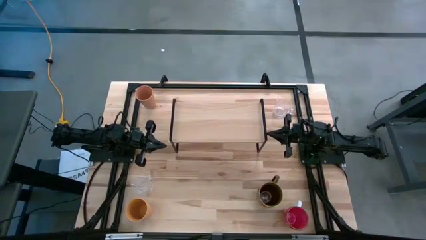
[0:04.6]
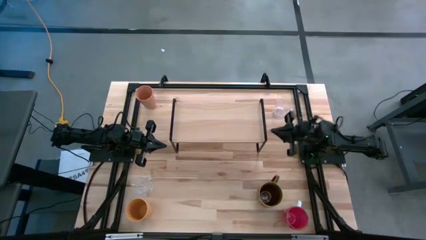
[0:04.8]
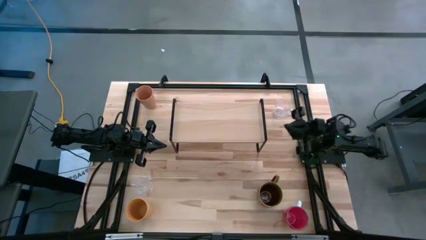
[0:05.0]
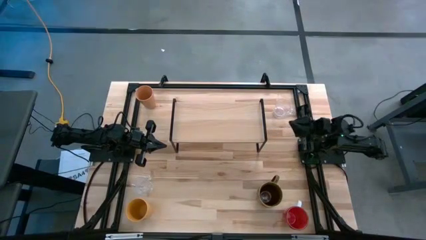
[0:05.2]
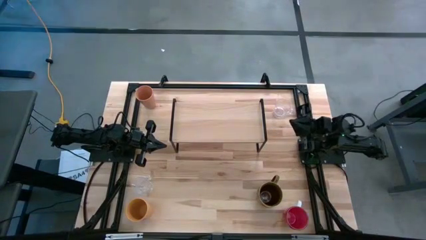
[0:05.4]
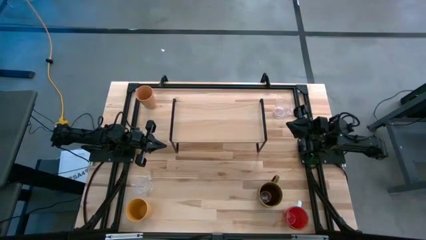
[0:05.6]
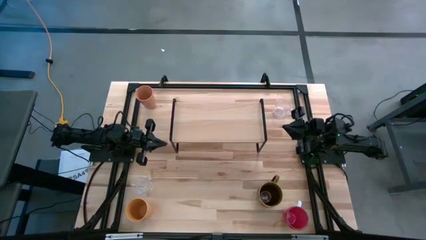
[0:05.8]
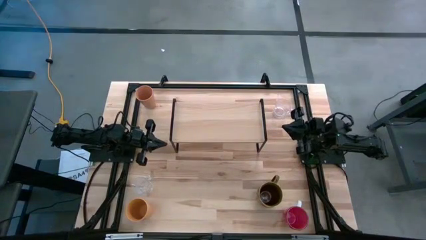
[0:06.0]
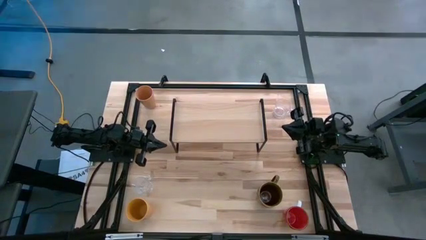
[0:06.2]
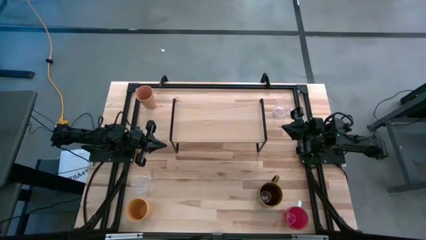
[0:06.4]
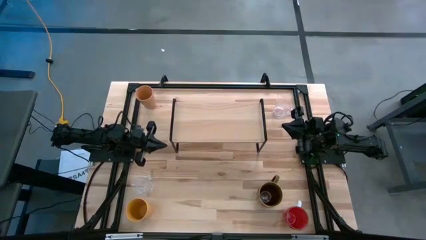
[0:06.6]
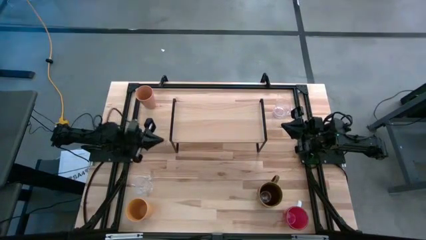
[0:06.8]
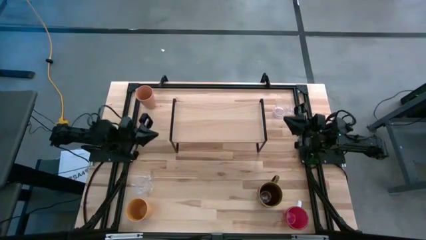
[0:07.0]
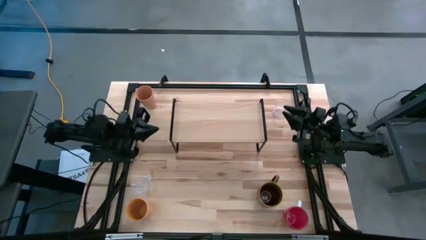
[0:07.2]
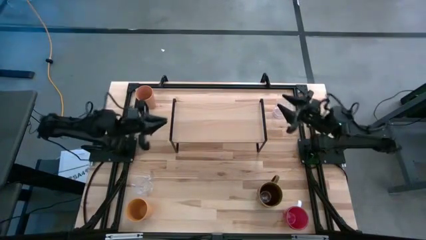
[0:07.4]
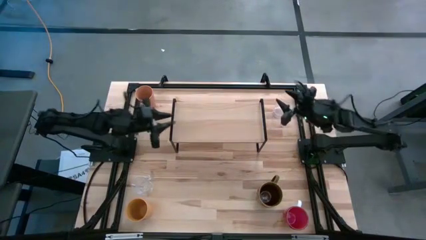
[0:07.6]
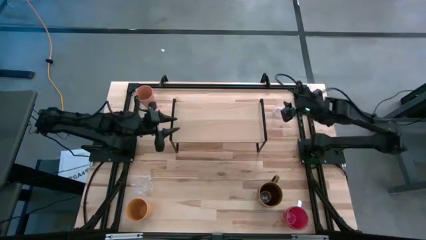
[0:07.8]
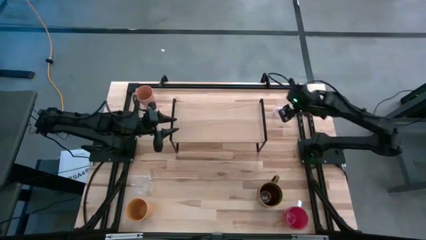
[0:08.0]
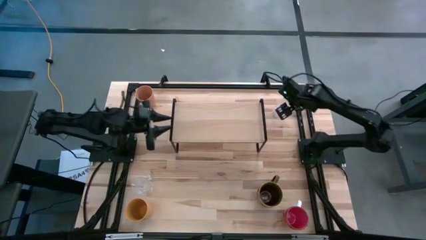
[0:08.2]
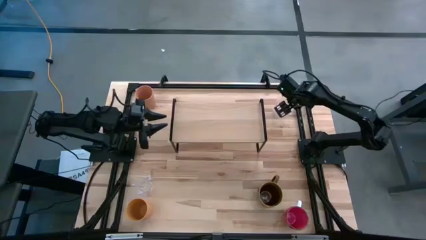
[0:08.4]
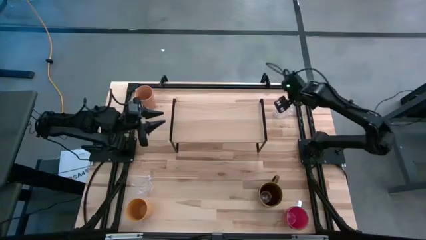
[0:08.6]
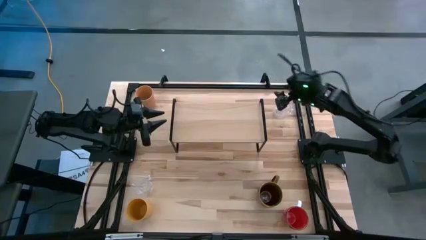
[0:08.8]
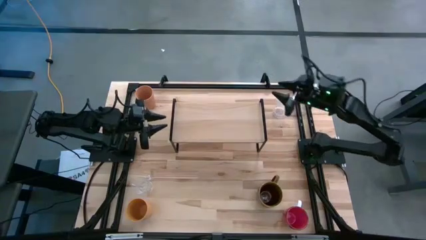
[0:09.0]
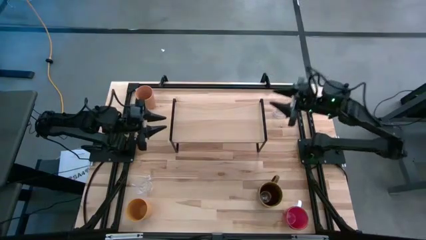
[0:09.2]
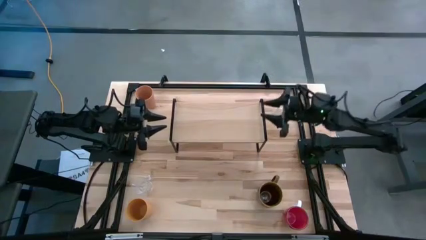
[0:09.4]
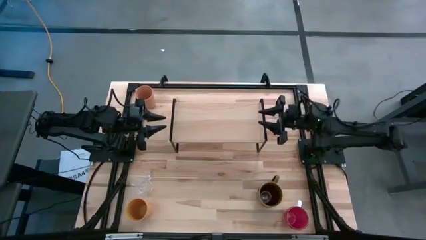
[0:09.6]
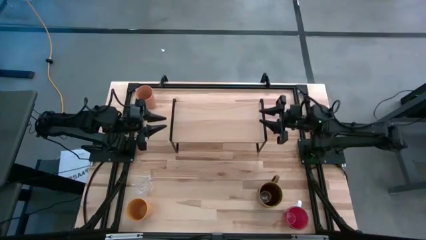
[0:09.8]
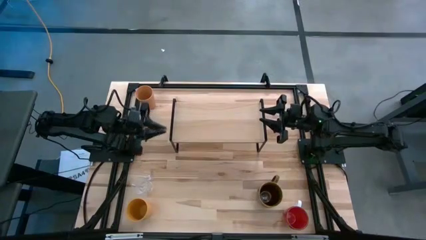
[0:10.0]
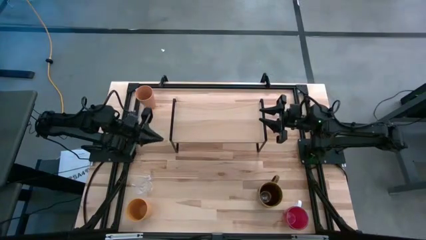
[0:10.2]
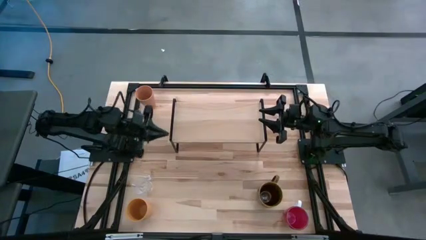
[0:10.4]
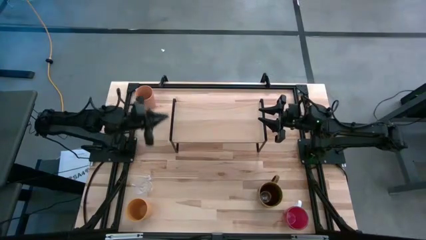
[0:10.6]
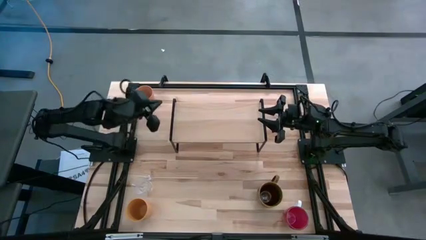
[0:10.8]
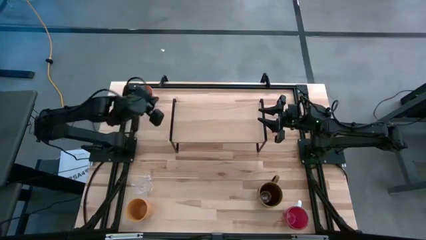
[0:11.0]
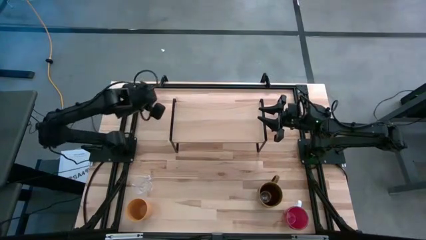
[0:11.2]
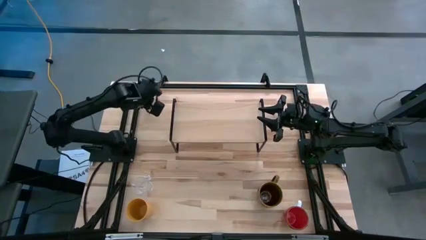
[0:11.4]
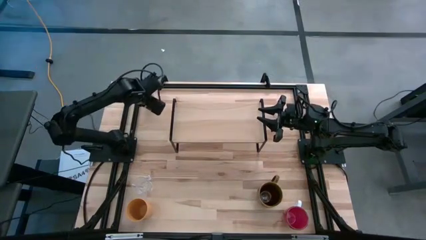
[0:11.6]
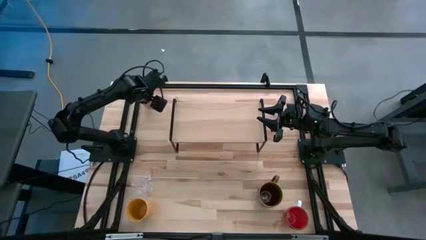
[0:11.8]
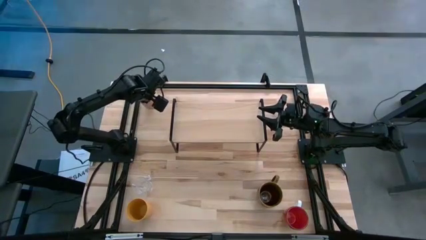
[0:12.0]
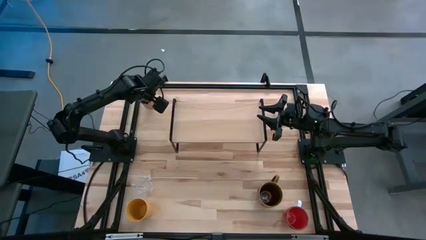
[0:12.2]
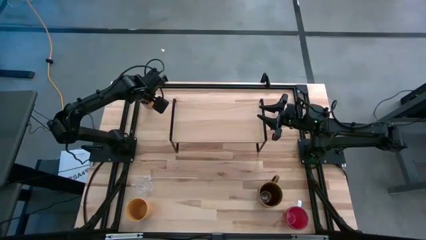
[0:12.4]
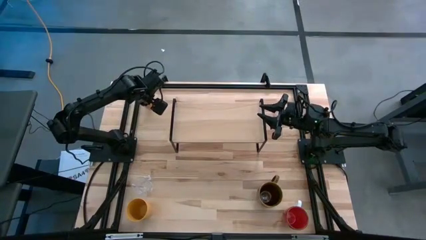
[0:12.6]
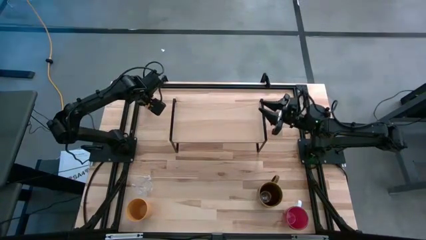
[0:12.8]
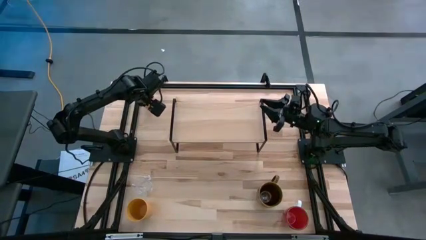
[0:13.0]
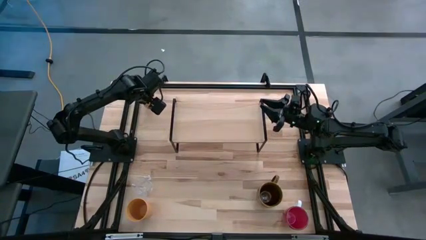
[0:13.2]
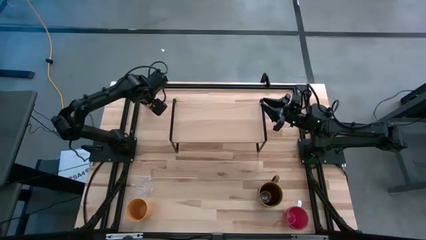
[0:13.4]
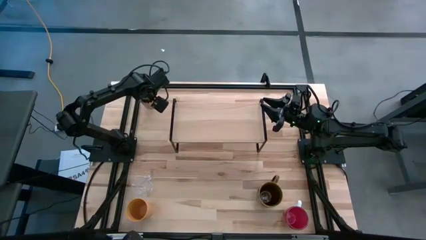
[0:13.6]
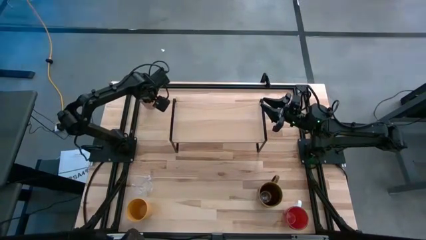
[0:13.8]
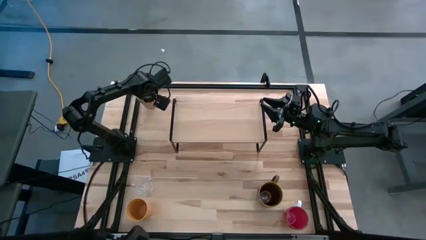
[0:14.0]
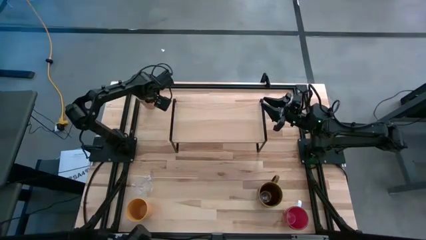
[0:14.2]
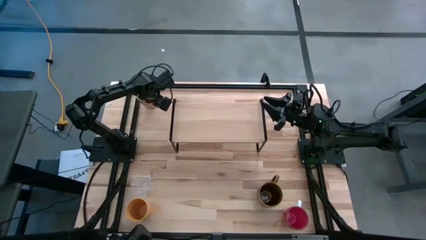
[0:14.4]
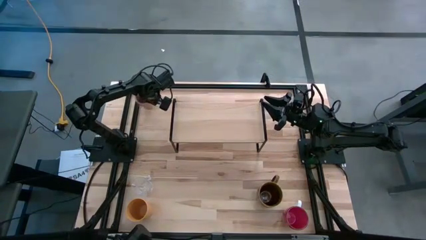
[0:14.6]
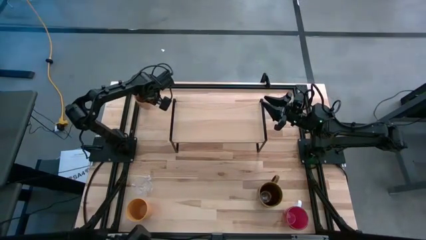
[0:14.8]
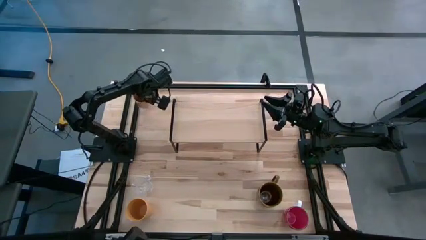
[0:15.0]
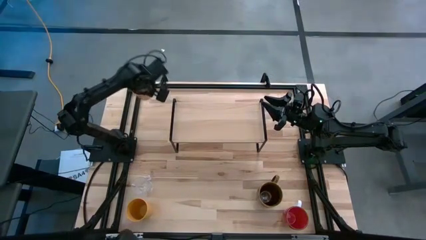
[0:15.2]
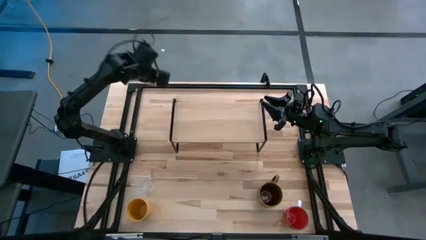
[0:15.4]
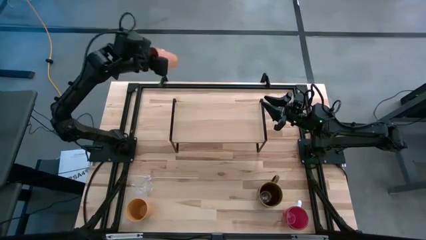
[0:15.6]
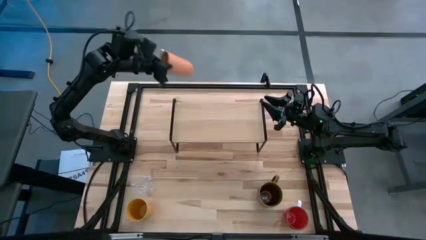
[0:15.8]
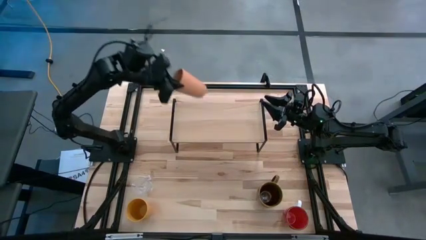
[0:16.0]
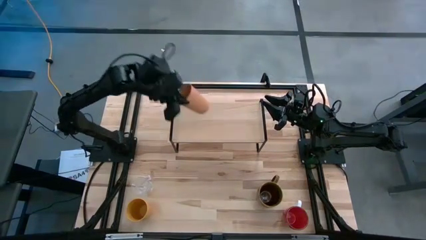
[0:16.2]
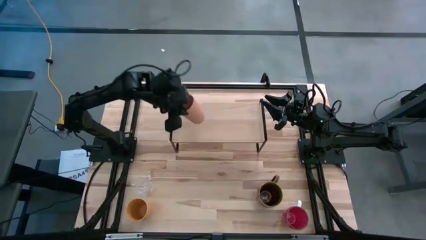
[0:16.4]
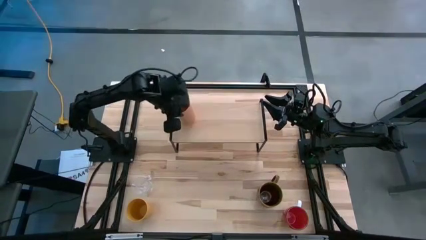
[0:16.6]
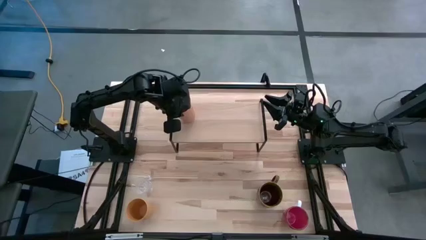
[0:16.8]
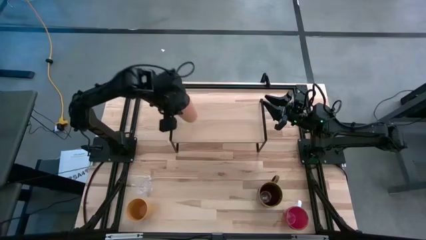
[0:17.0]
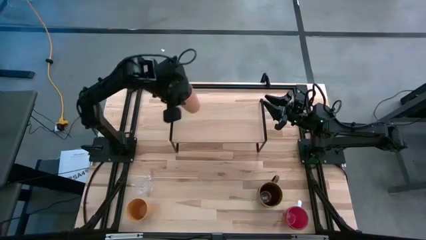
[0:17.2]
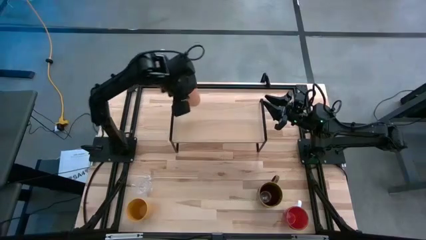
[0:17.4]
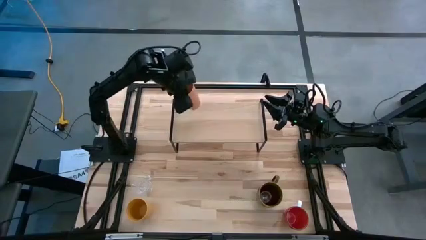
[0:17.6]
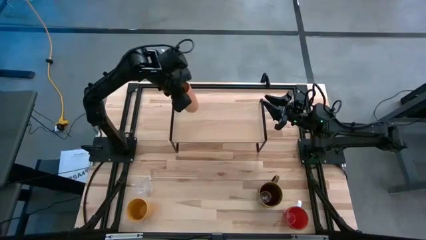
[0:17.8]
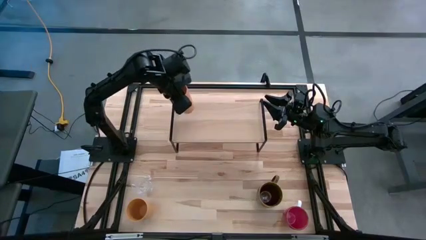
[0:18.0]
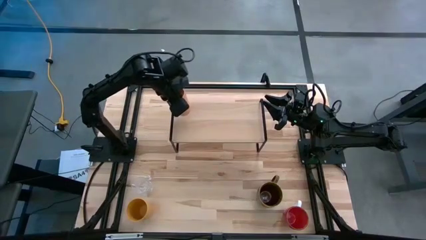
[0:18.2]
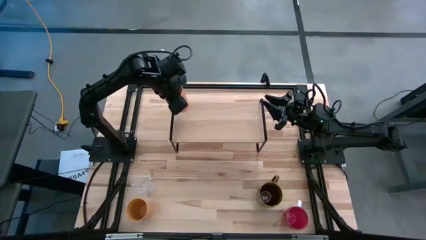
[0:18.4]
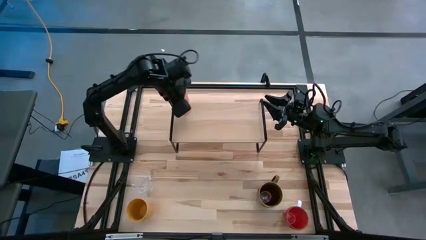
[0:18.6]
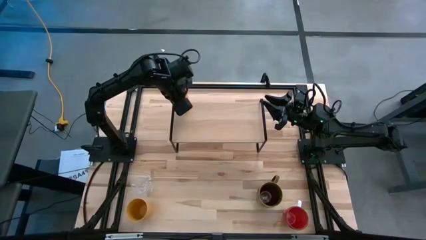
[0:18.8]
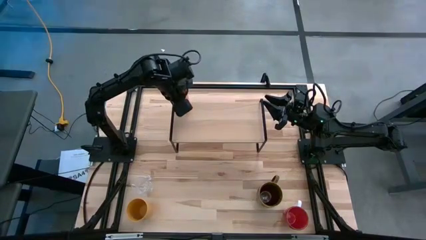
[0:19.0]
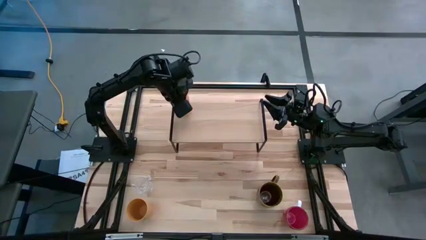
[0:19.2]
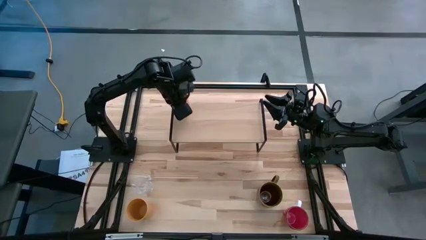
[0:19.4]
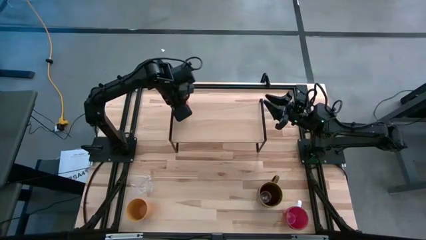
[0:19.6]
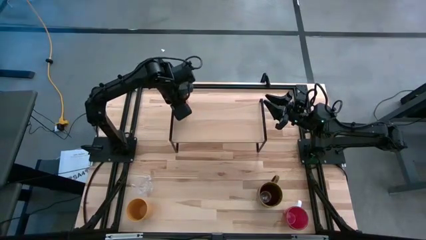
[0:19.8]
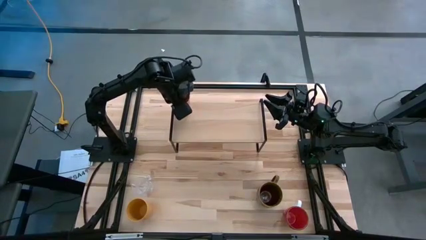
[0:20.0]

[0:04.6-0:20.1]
Task: Stack small to large cups/mugs on shelf
Put the brown cup on the shelf
